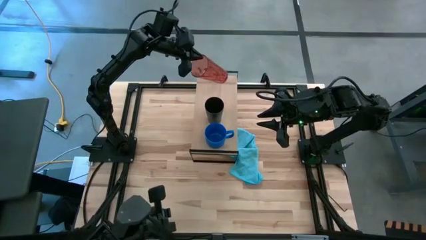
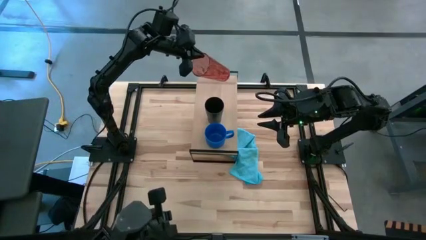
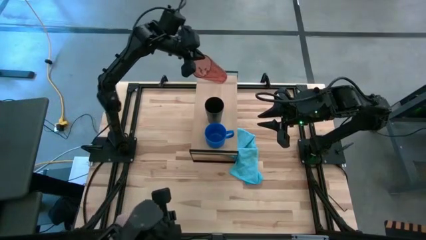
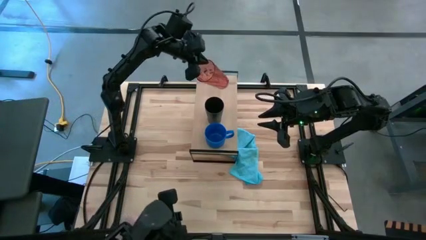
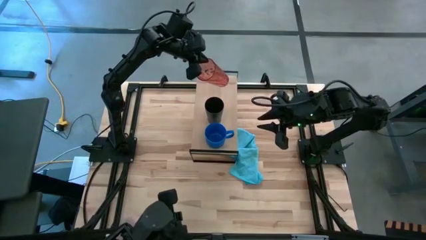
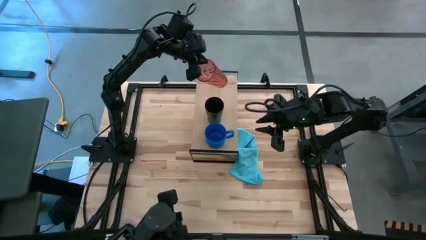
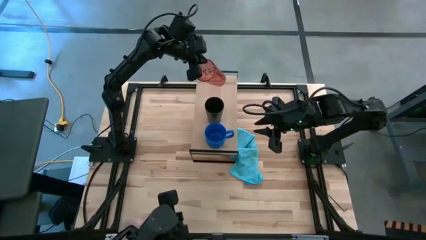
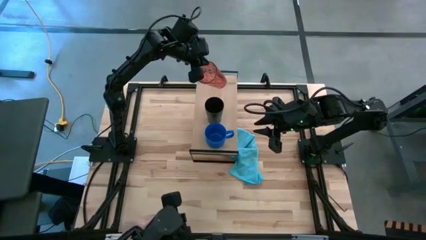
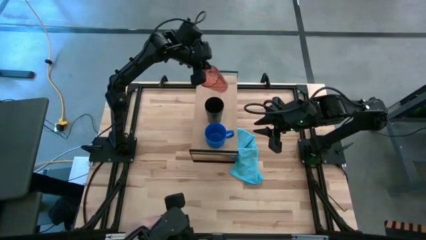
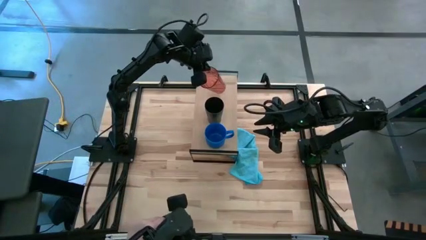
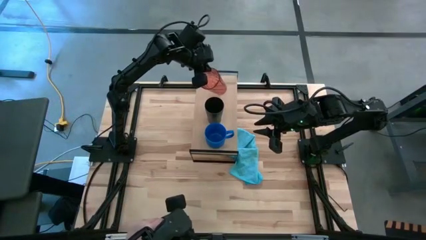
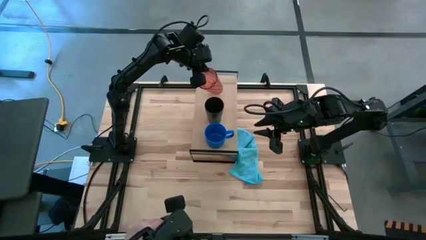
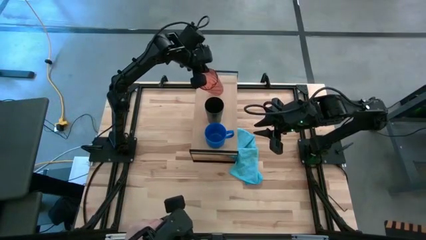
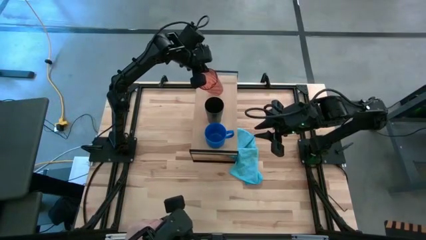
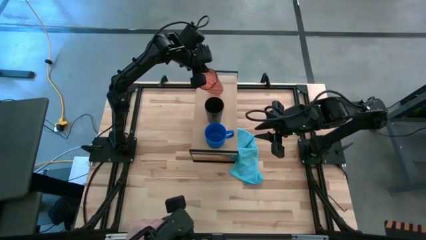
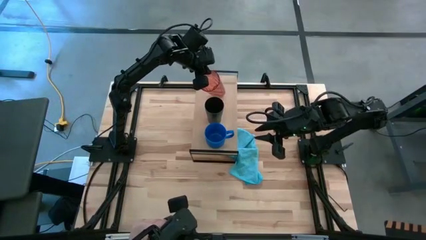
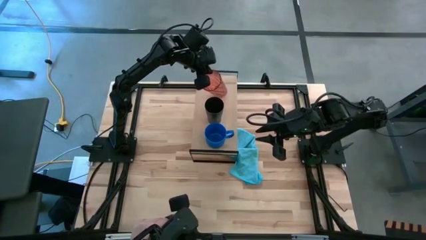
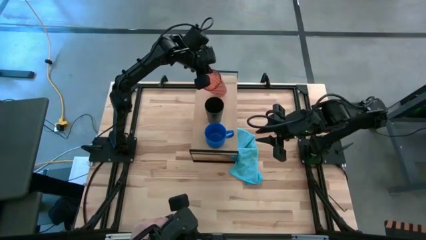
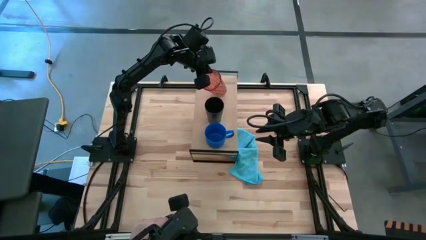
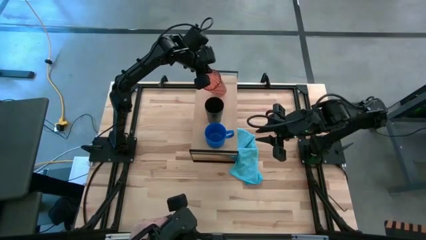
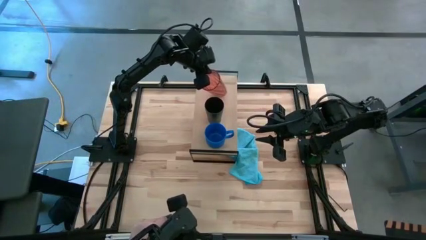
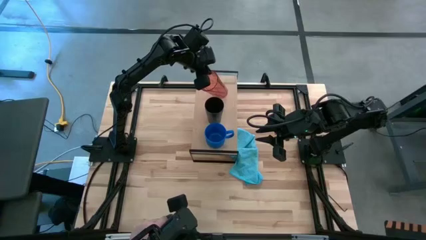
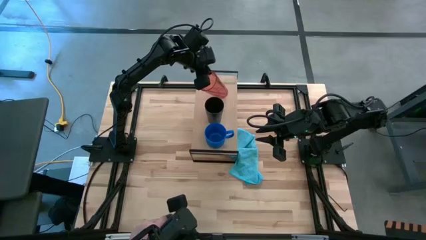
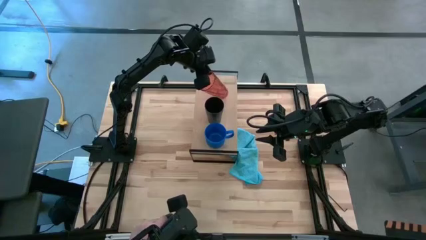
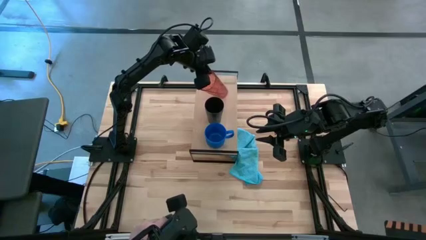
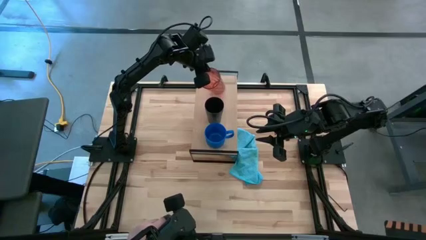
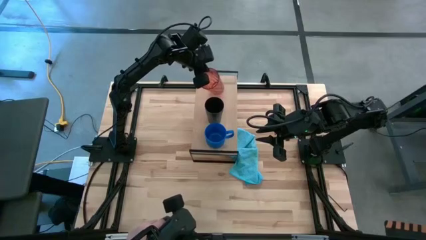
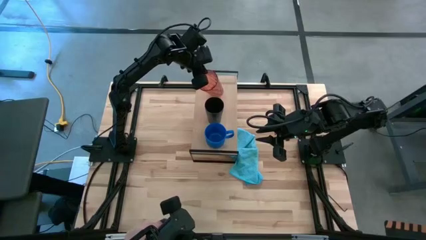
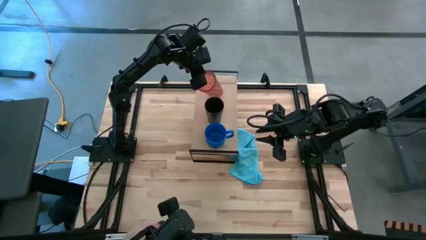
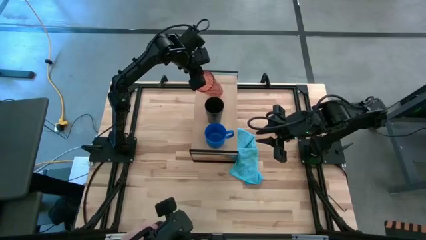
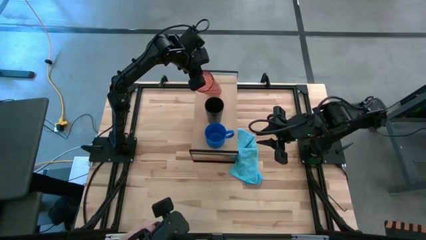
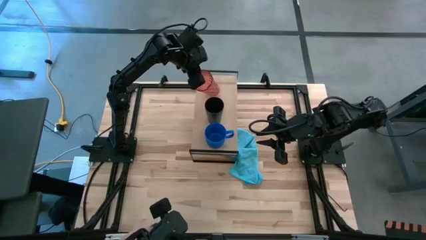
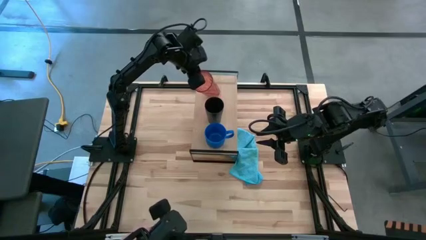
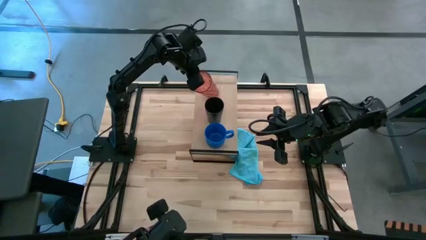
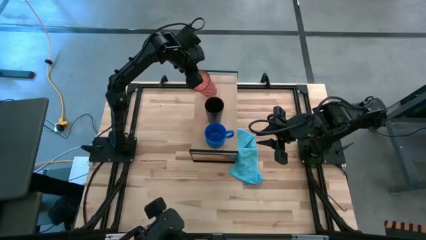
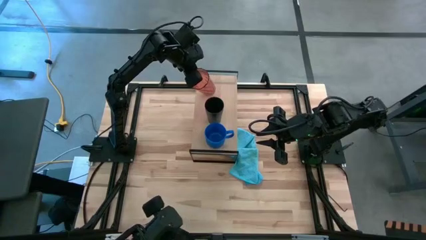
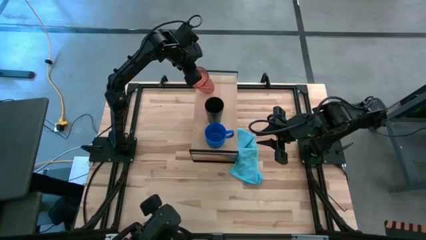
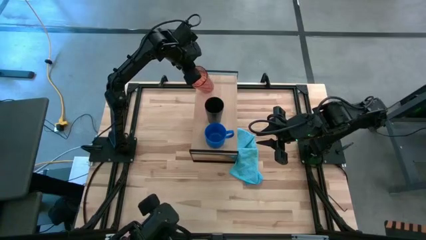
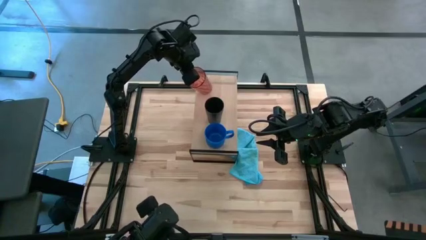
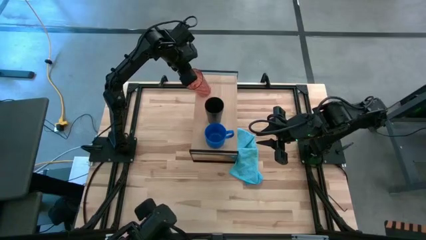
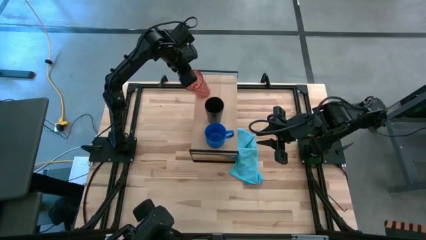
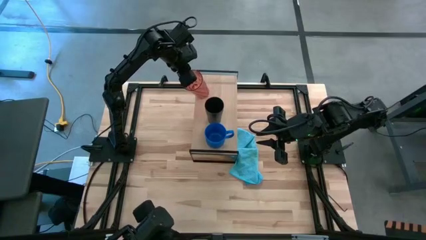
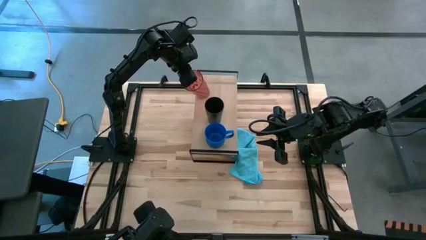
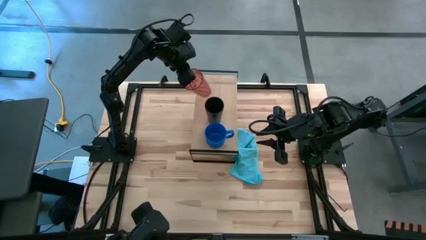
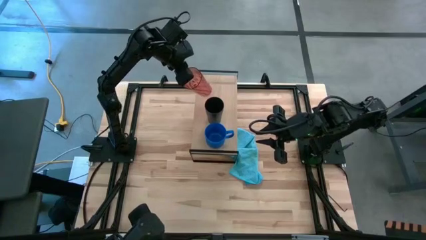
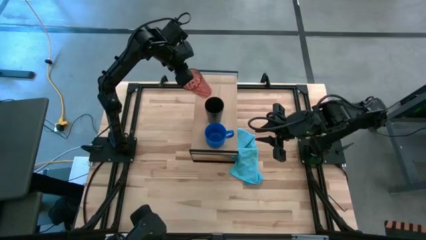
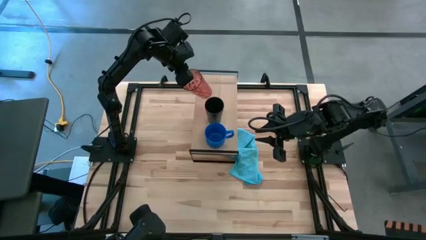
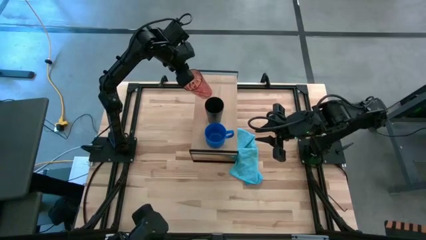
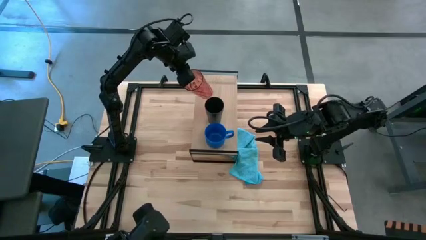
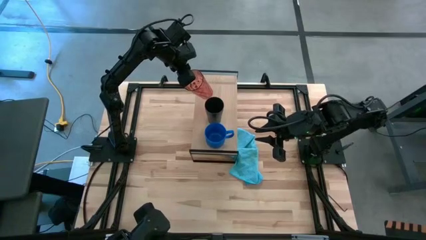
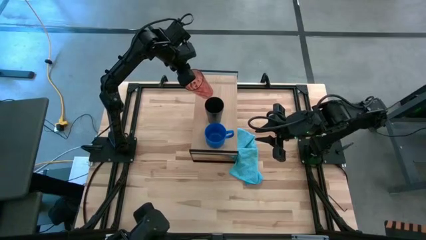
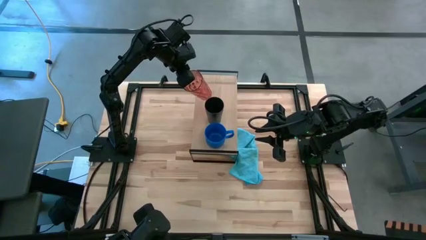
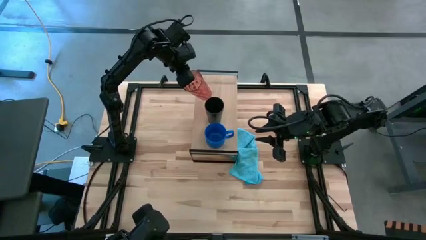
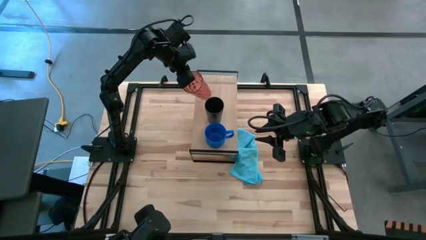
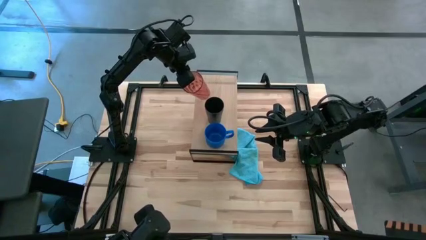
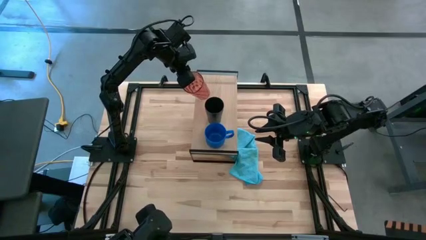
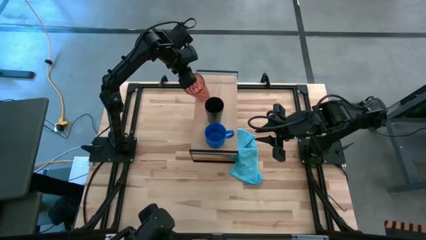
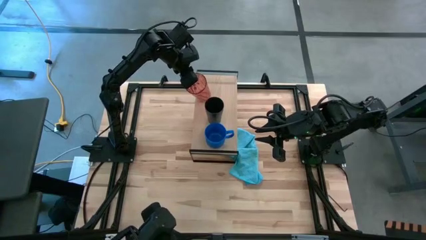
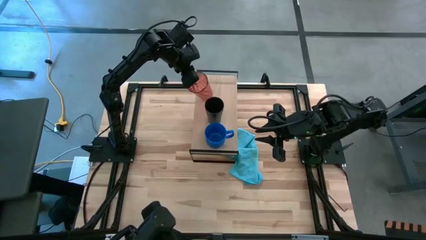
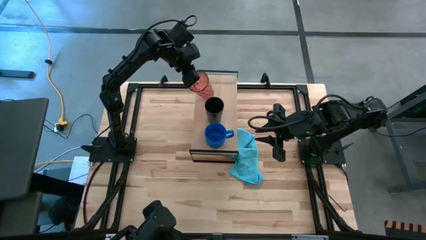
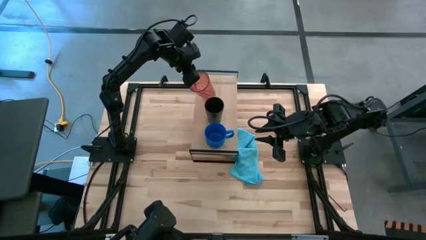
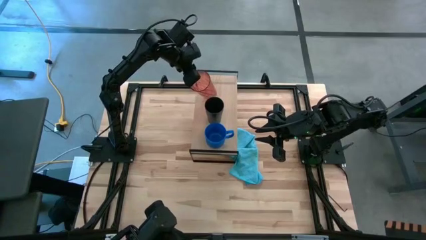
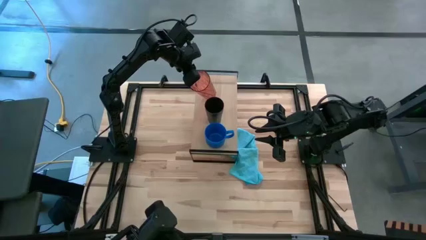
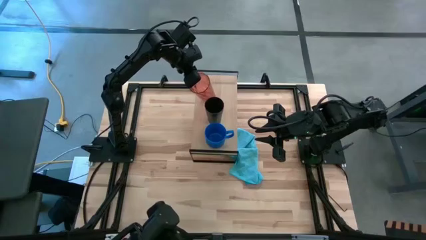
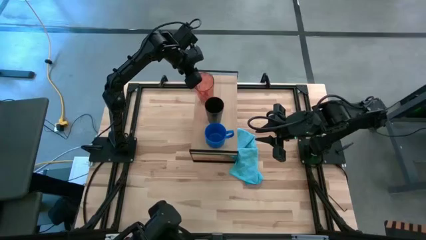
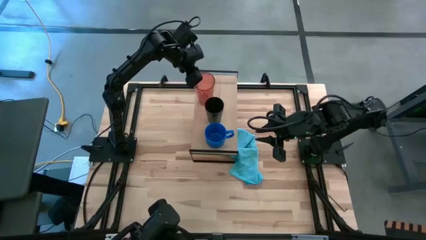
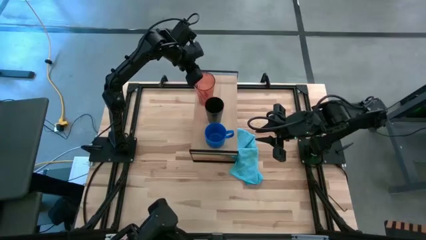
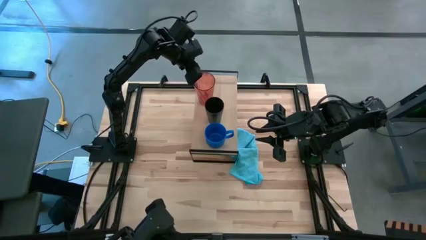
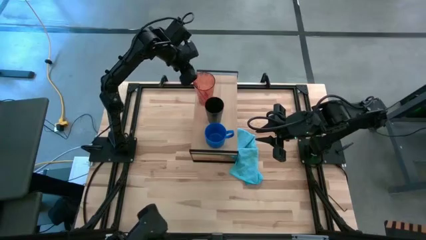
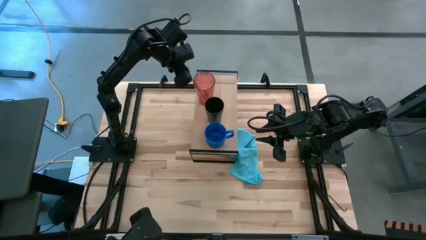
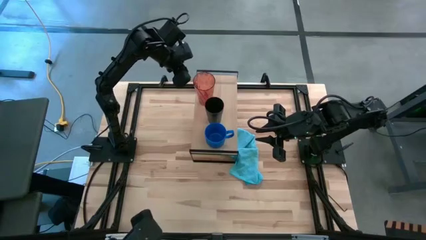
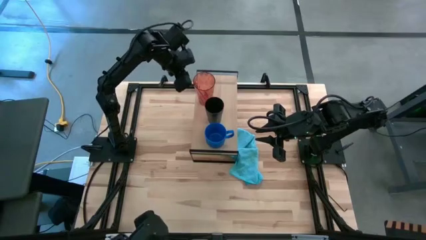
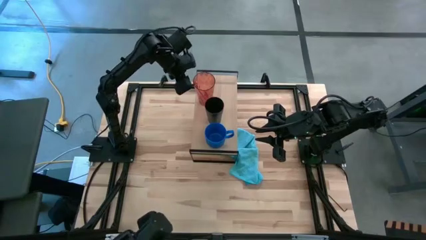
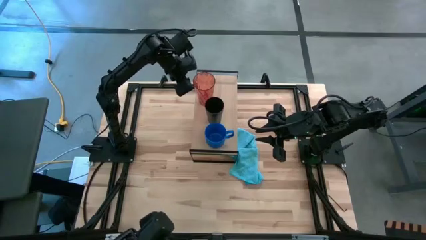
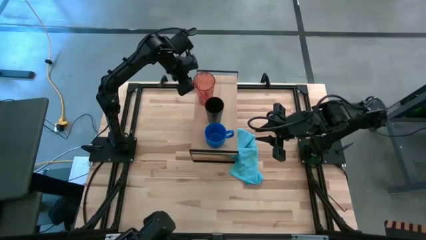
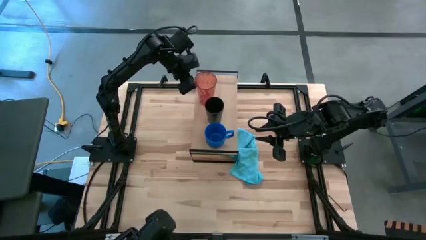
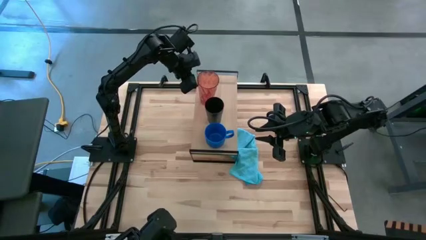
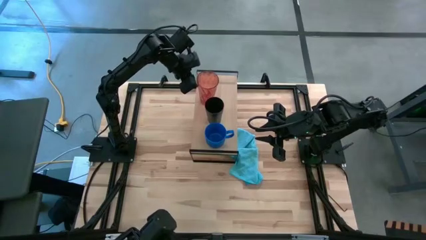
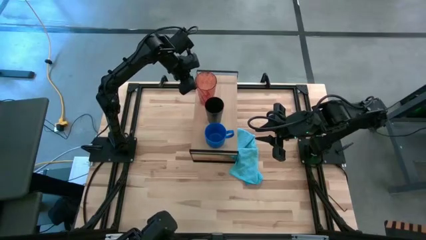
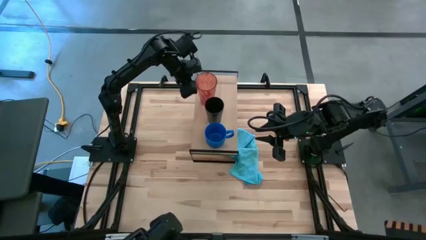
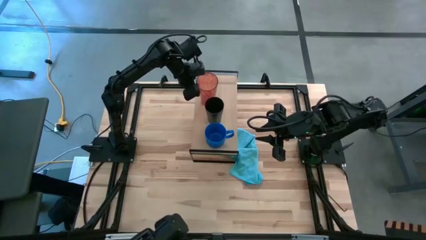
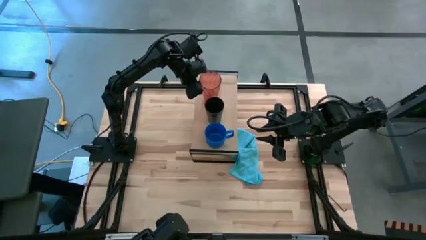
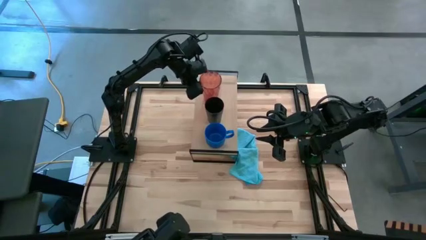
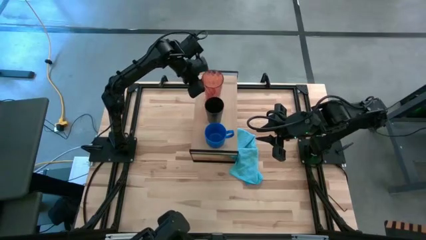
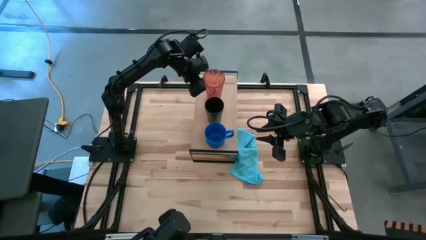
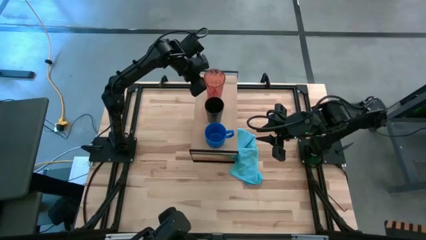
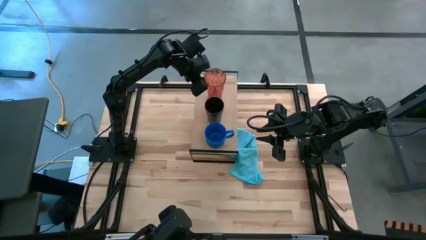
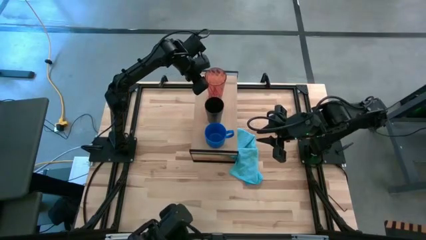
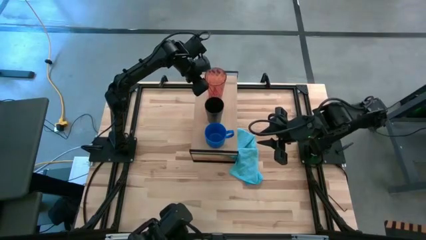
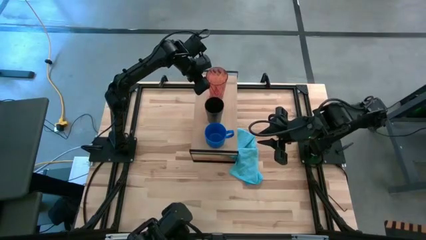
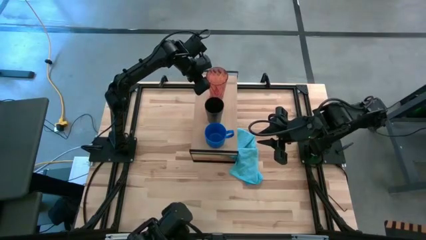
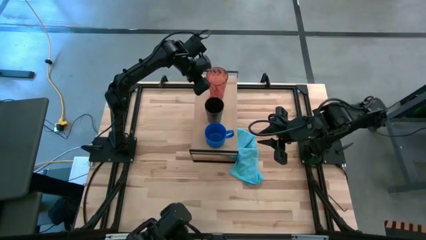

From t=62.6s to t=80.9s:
Task: Stack small to large cups/mugs on shelf
Put the red glass cup on the shelf
